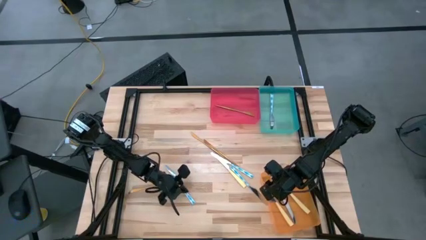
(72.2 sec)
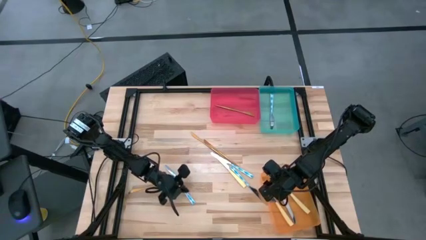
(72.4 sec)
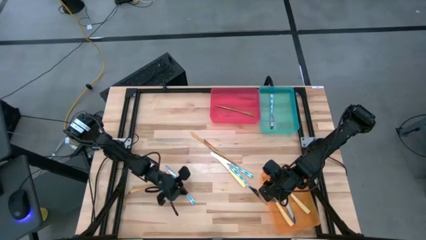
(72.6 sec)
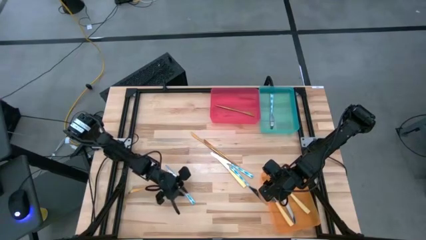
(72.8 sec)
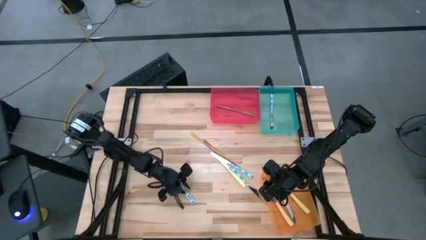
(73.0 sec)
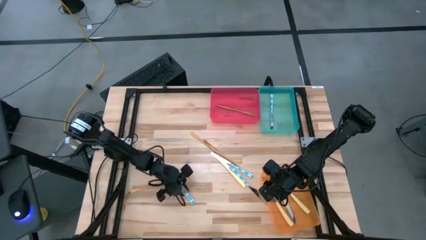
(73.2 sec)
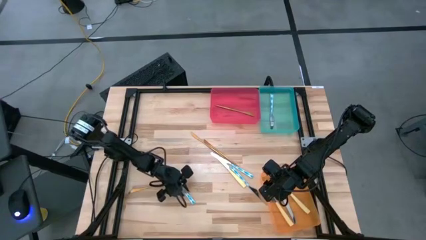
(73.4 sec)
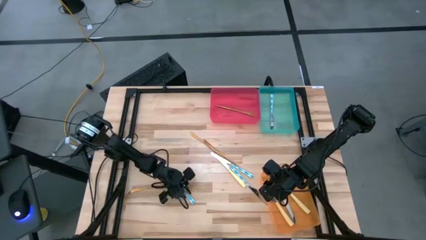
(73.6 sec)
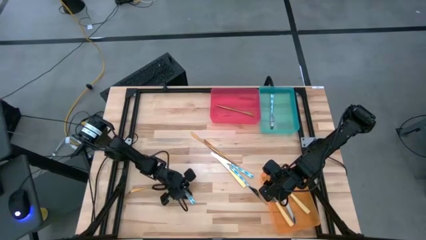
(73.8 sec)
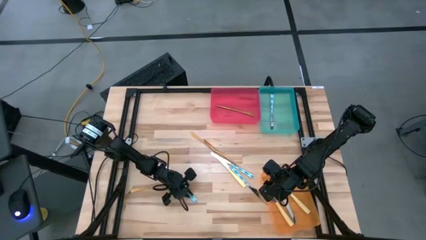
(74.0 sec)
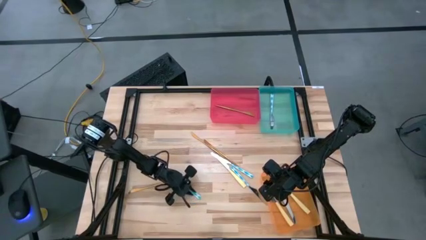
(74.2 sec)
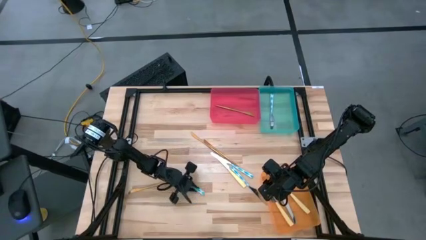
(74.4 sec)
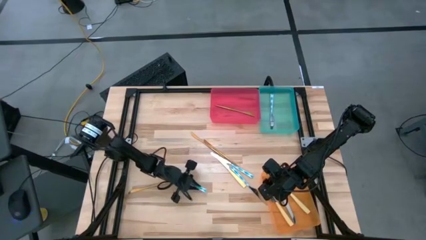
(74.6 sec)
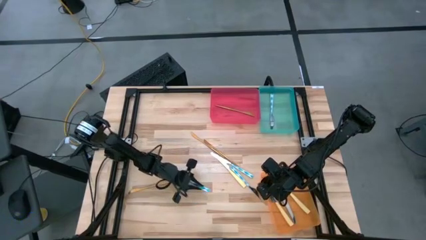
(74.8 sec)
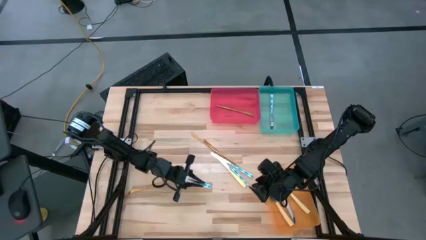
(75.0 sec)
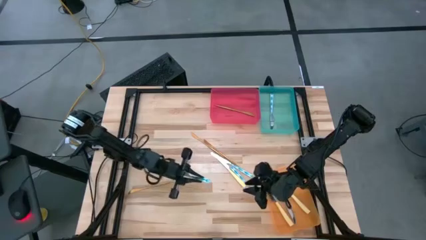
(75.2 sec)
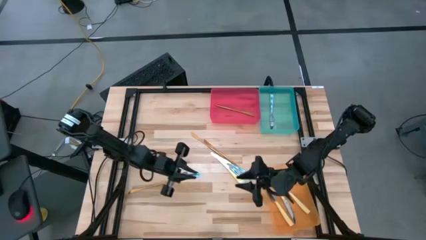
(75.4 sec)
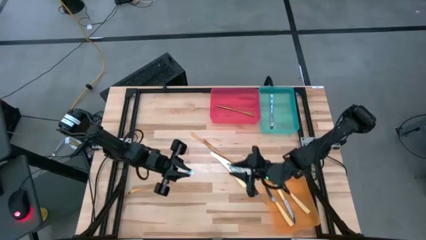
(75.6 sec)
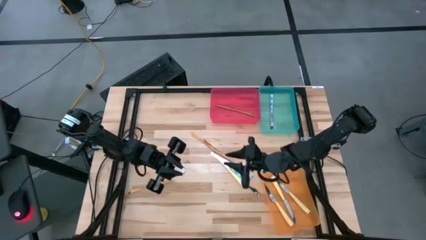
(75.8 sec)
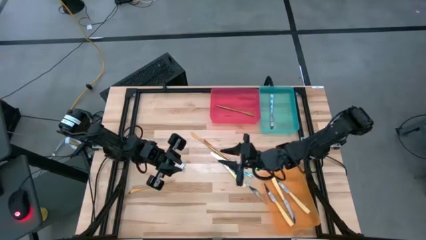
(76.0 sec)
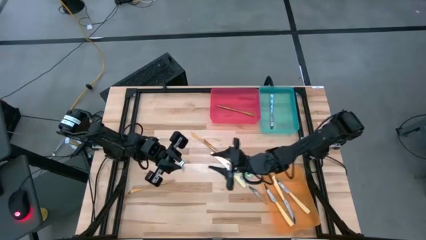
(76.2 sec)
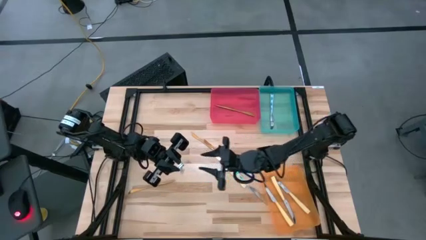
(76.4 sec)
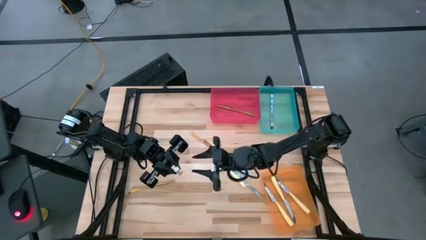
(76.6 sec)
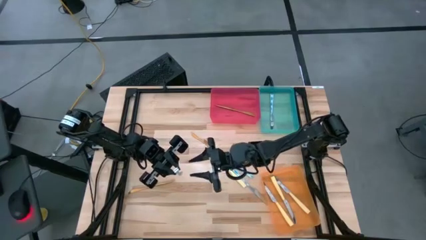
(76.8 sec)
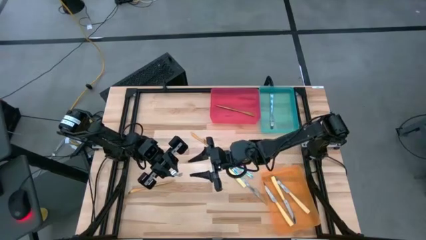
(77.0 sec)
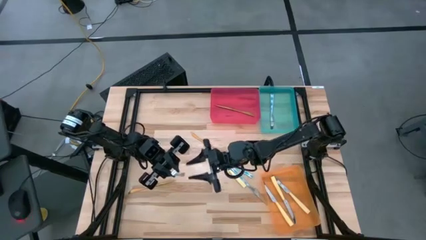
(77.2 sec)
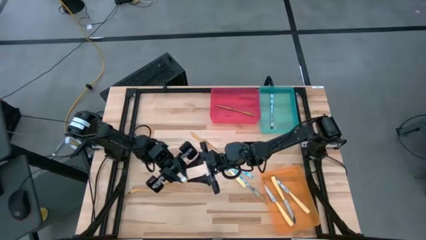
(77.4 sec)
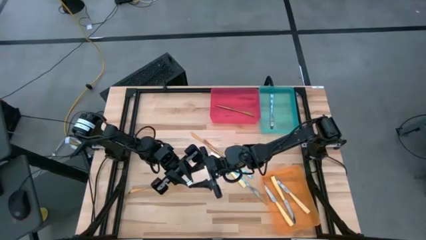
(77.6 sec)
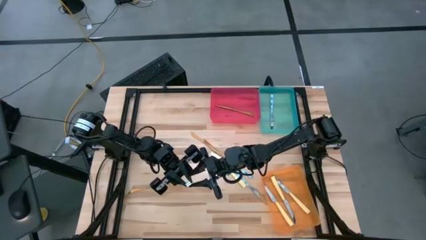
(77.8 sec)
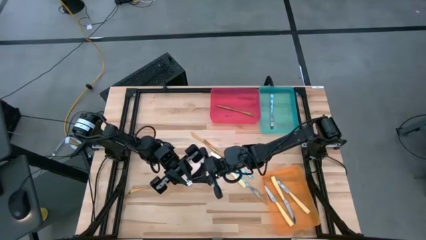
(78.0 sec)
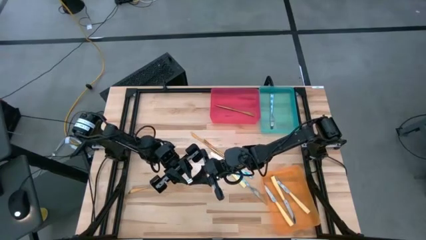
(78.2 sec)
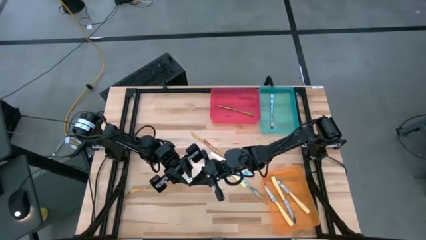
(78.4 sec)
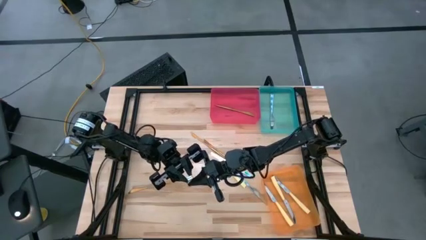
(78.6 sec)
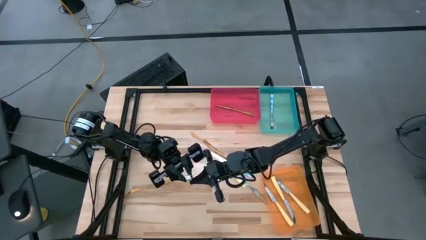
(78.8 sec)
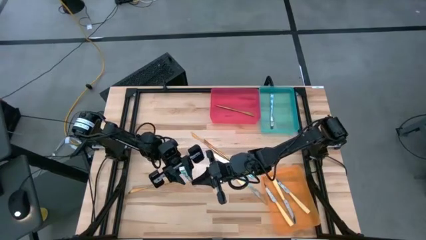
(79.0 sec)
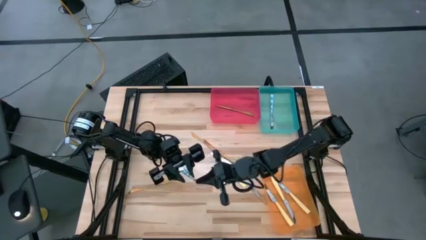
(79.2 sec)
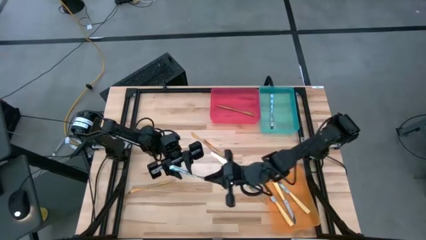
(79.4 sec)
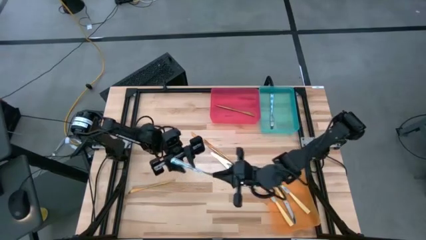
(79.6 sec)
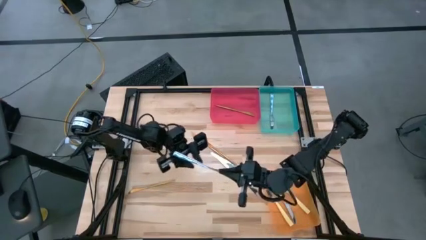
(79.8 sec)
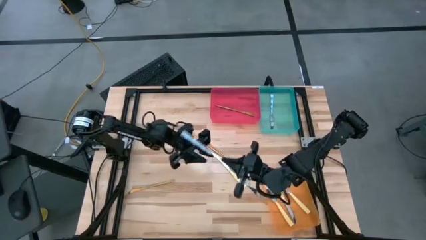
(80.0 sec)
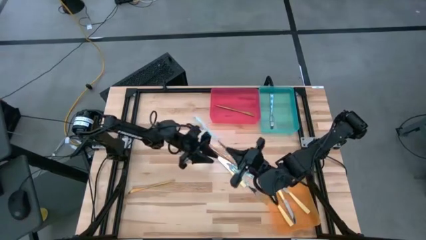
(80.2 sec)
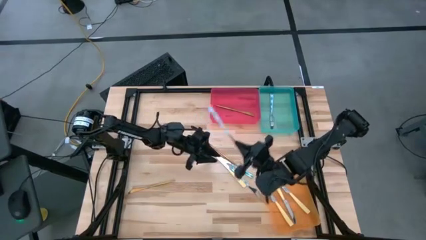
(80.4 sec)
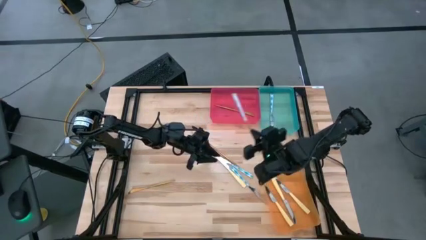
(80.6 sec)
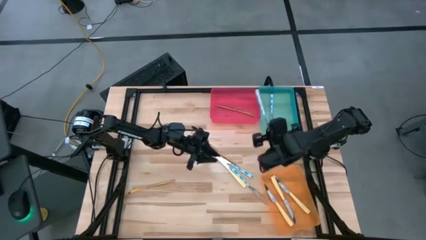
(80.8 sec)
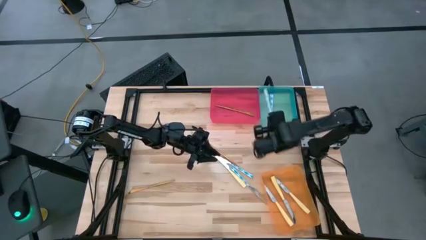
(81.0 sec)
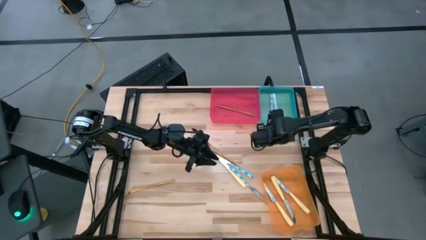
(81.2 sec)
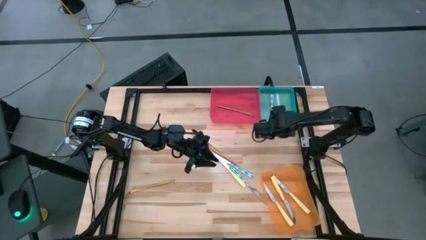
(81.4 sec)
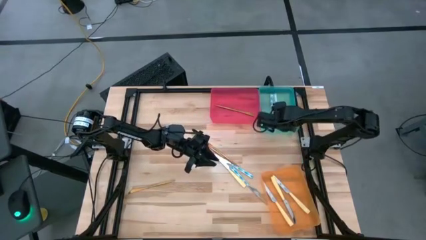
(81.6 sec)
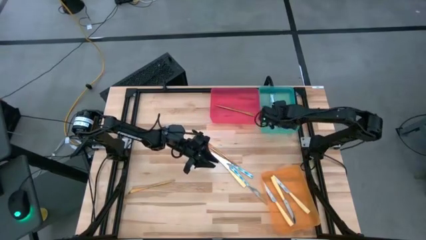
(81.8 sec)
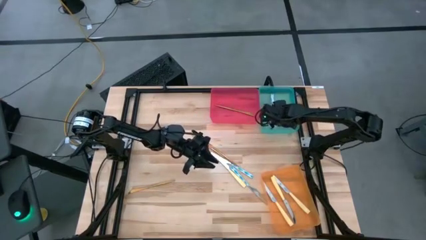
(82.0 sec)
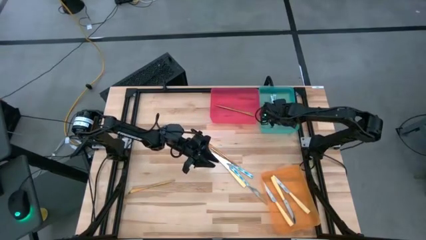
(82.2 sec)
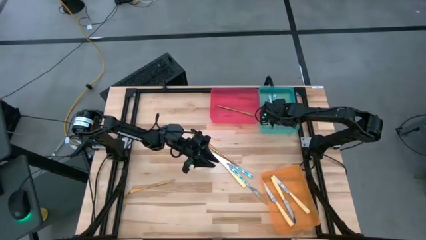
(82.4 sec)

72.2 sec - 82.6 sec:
Task: Sort silverware by color (type)
Put the blue knife into blue bin

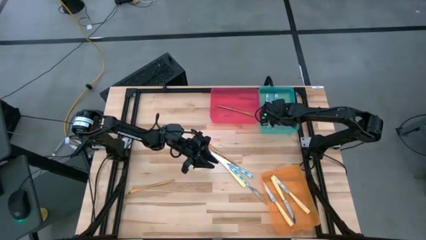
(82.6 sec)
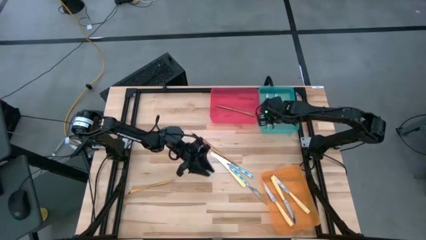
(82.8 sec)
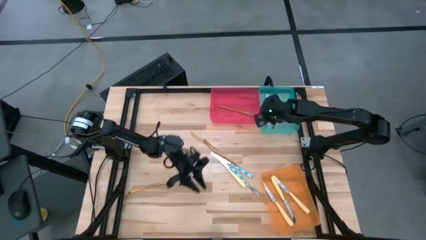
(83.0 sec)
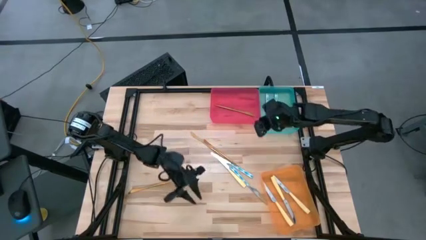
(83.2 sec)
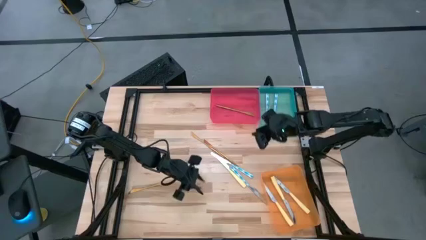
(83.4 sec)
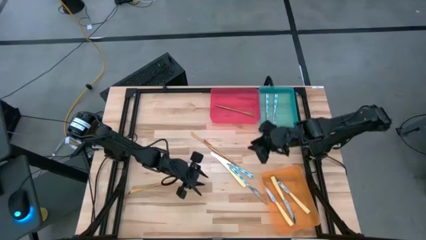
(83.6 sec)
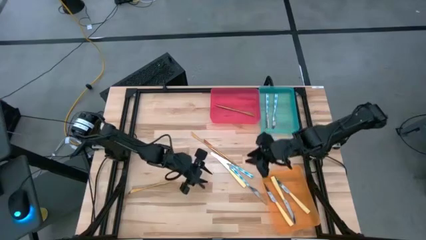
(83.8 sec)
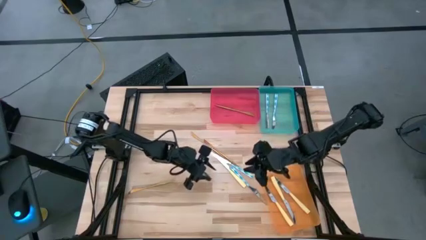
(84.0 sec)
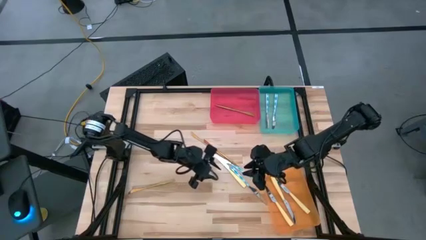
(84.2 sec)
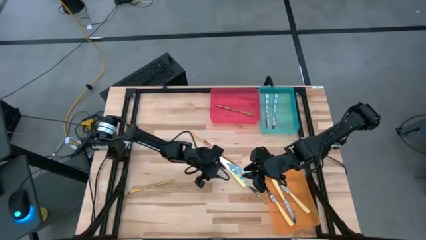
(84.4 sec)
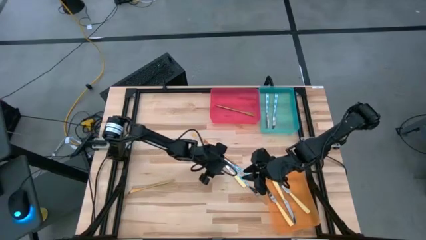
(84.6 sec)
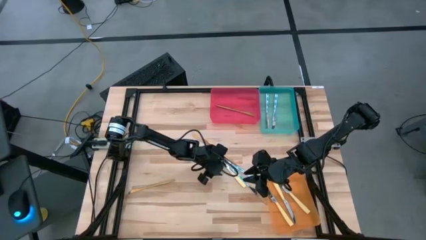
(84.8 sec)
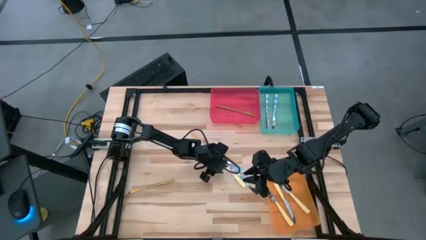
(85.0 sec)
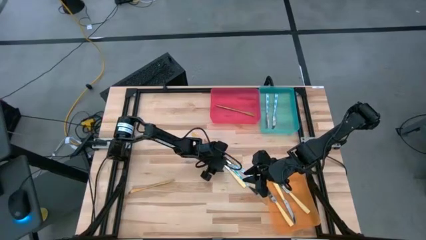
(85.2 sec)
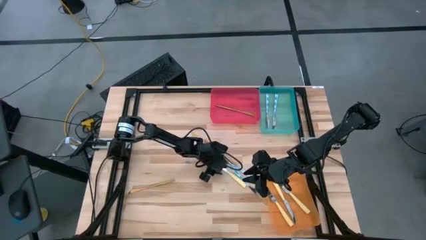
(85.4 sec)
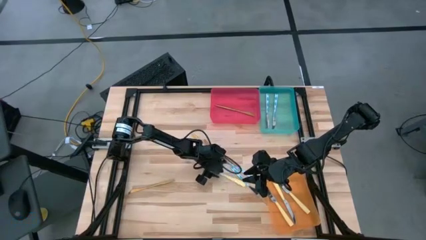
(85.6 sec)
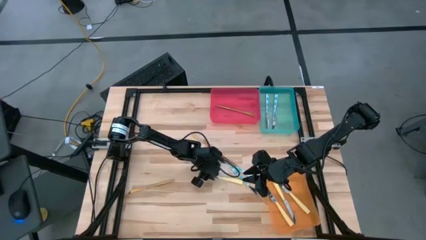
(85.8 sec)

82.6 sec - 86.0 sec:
Adjust the yellow knife
